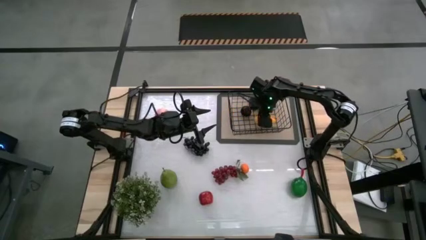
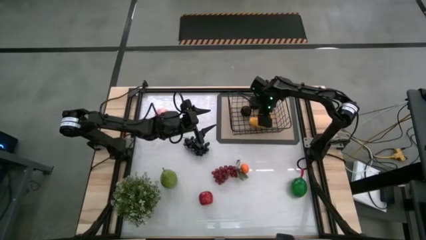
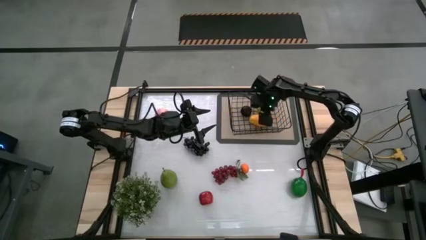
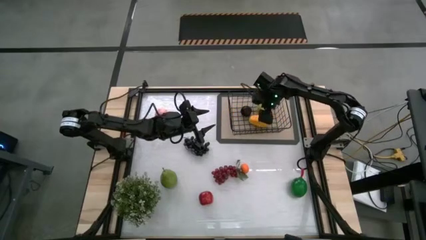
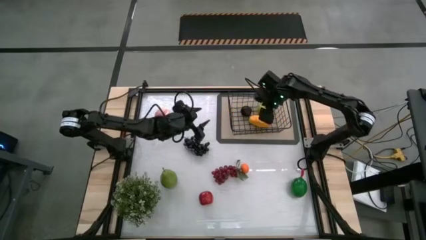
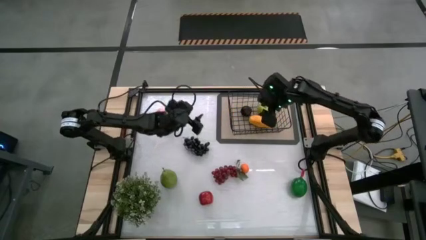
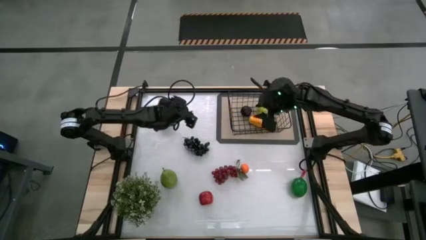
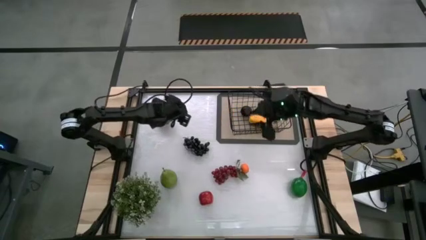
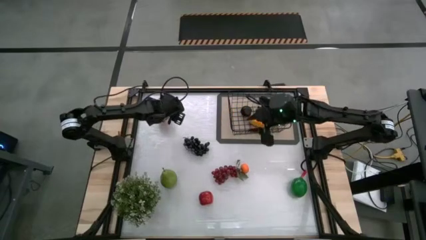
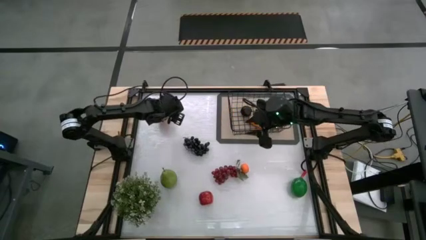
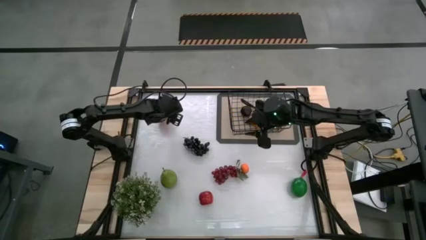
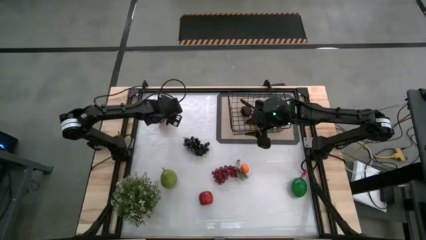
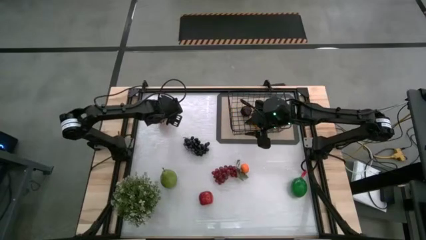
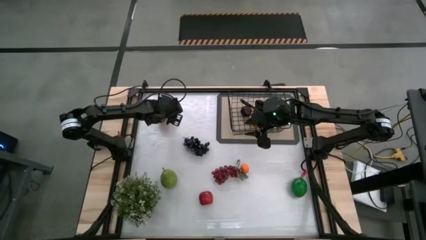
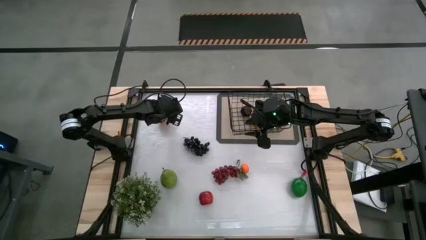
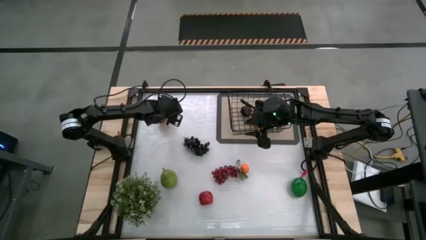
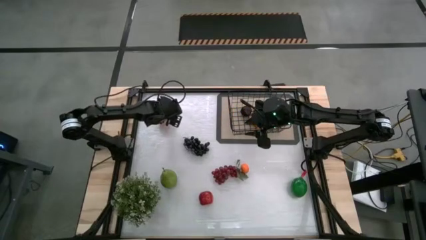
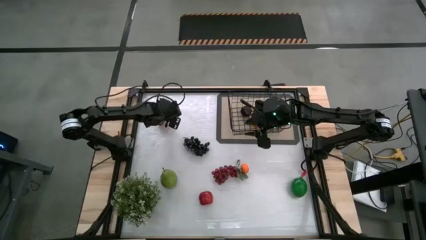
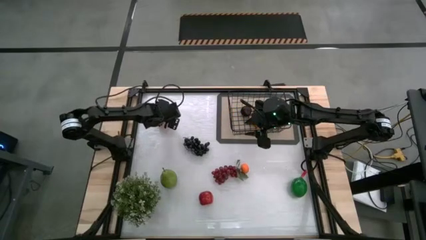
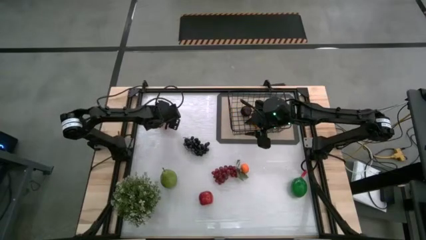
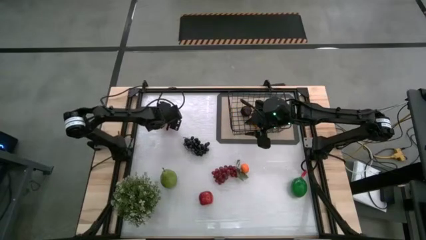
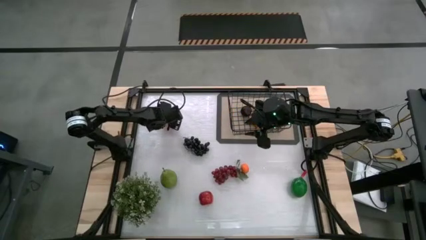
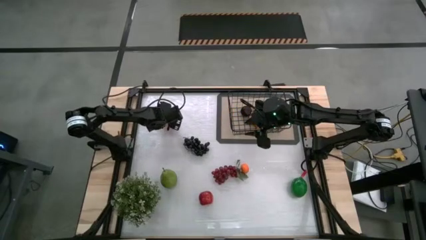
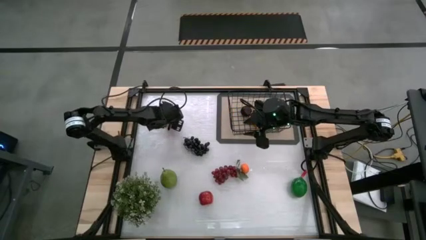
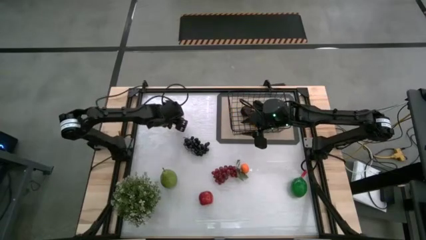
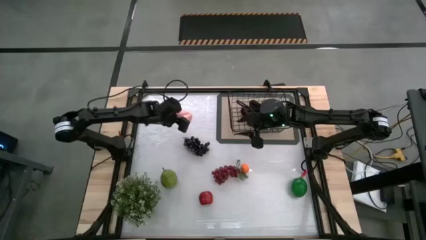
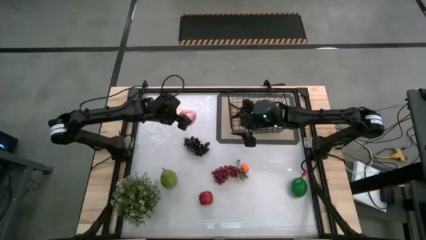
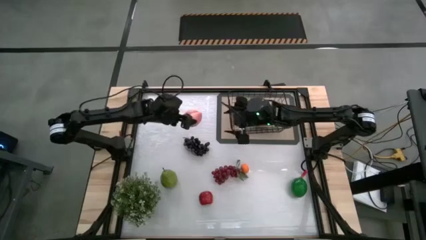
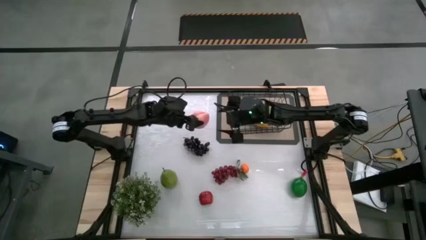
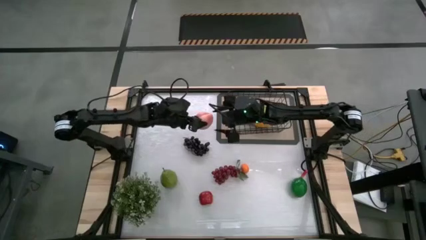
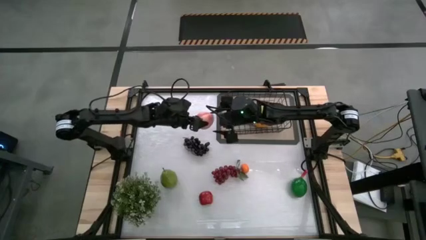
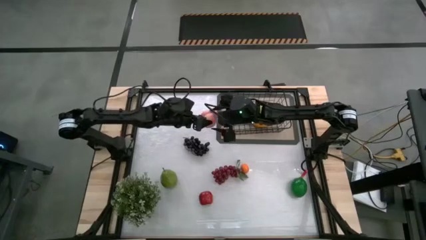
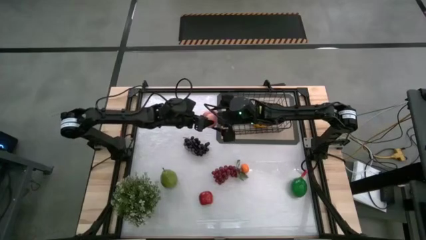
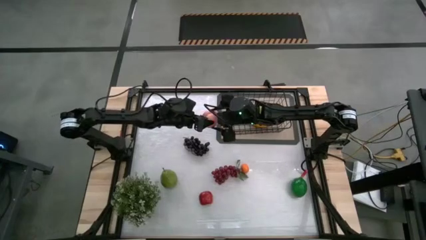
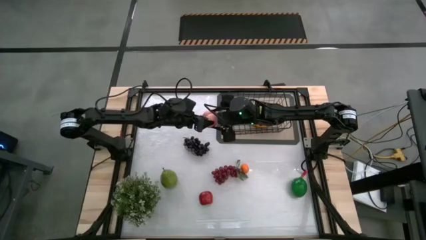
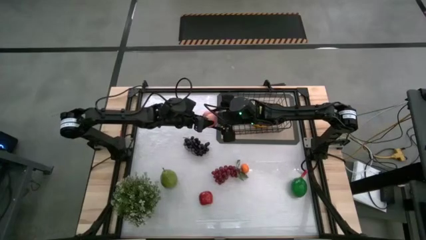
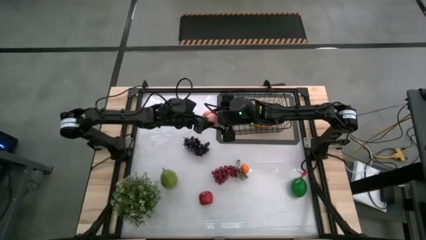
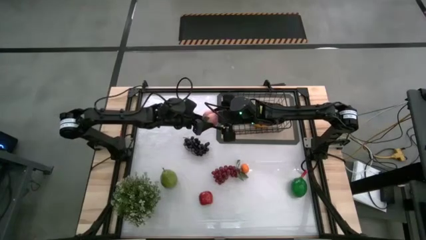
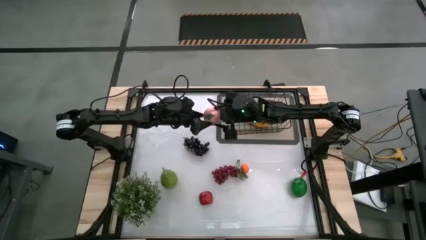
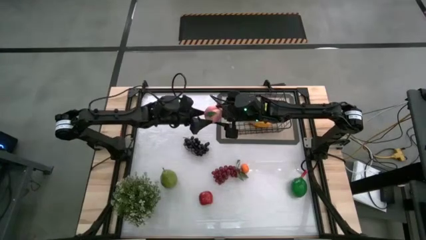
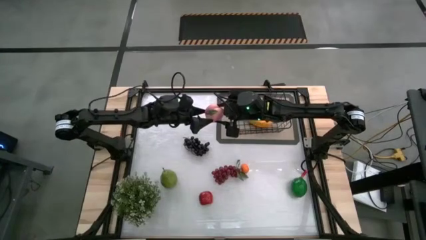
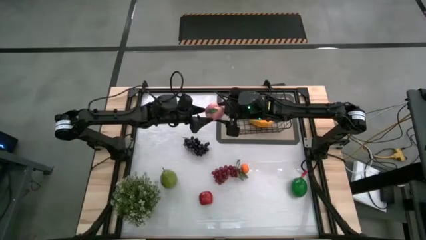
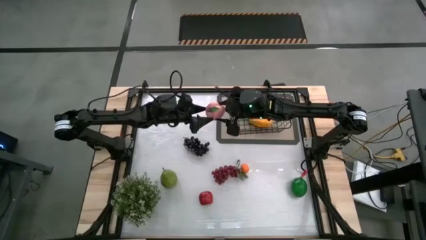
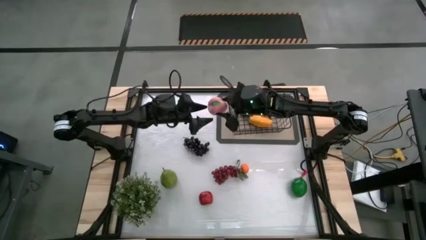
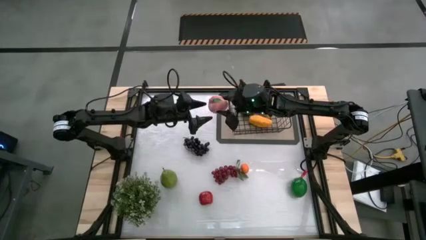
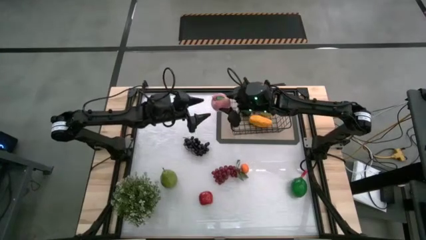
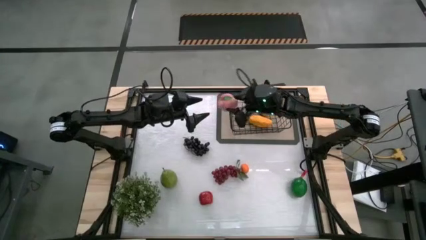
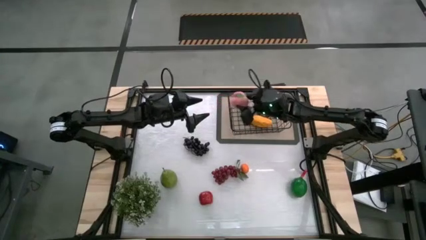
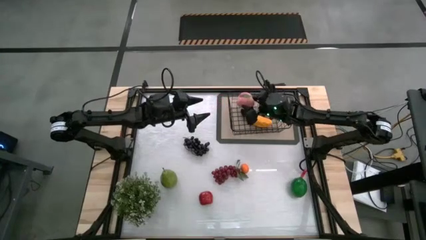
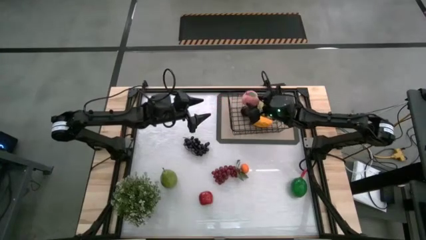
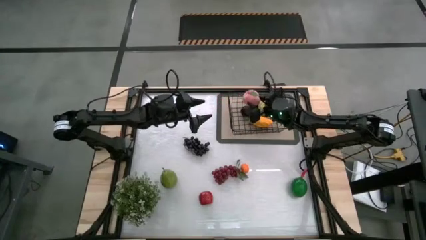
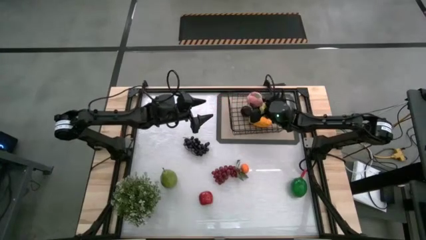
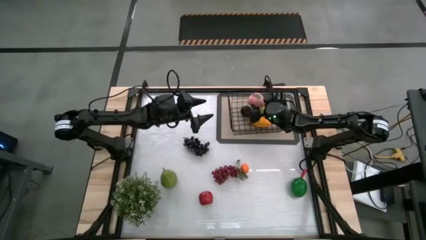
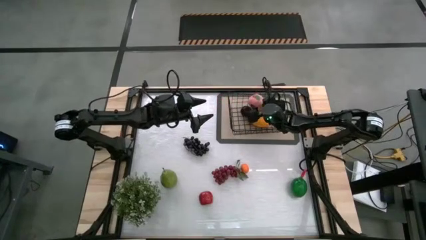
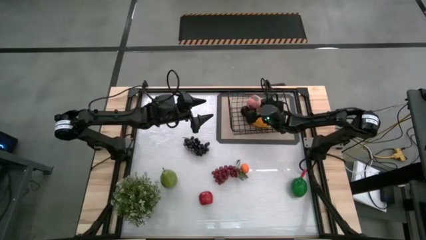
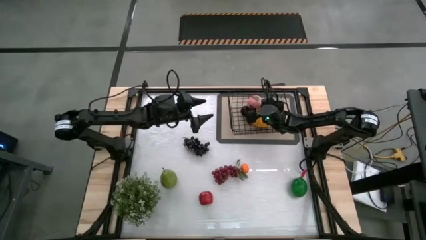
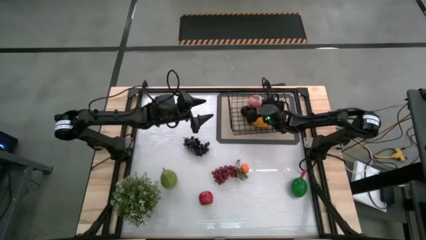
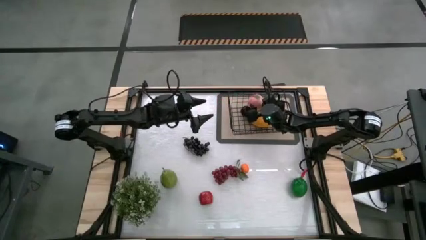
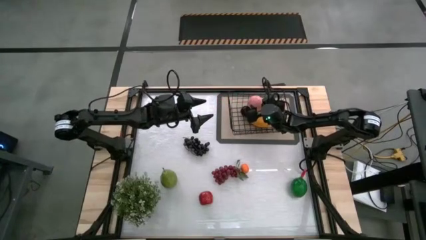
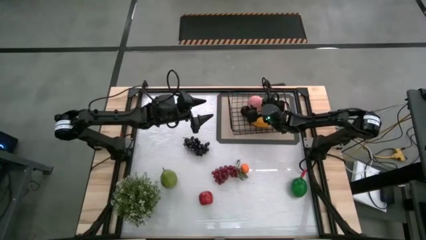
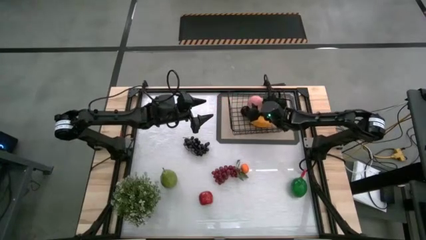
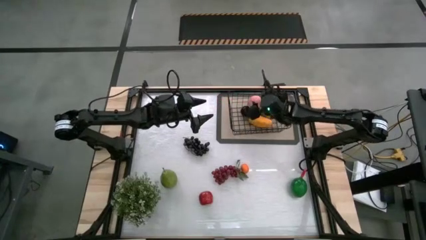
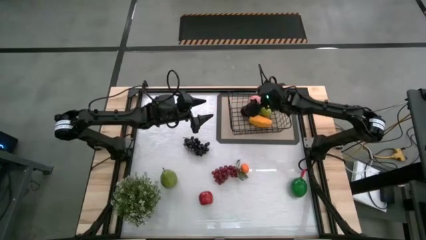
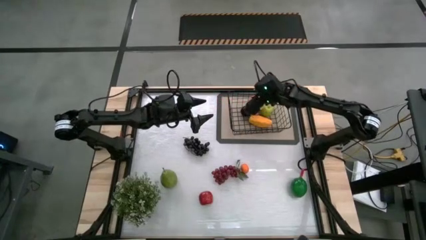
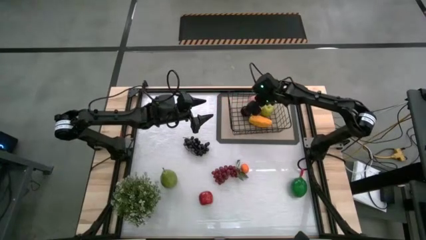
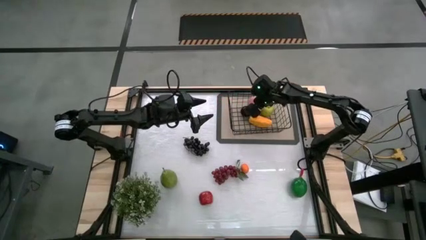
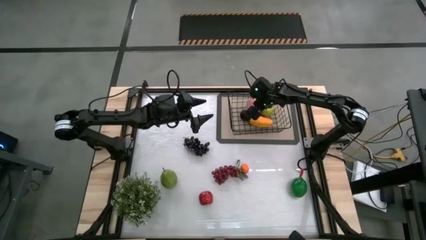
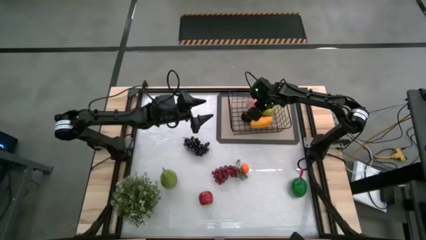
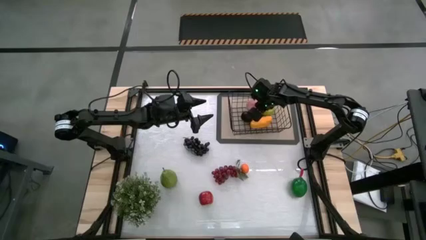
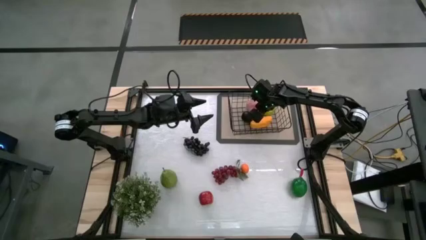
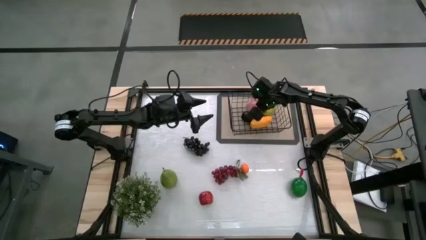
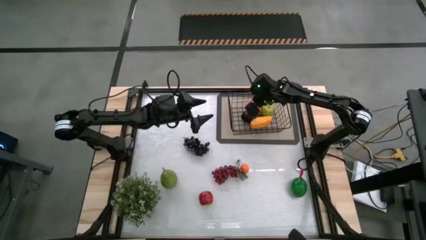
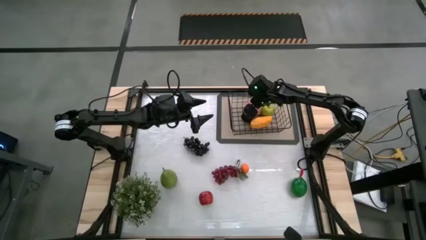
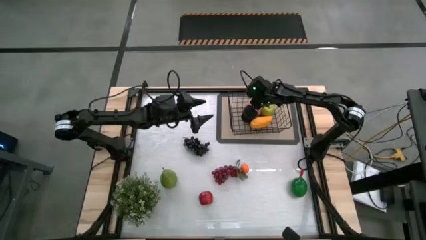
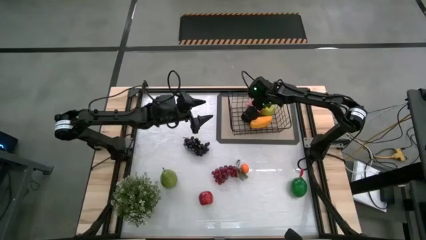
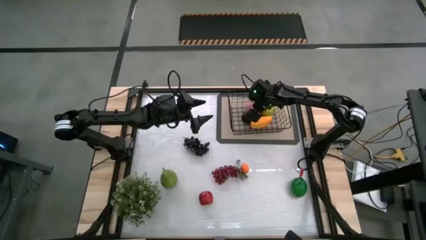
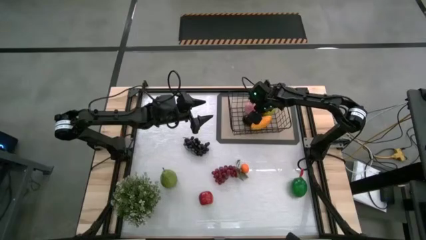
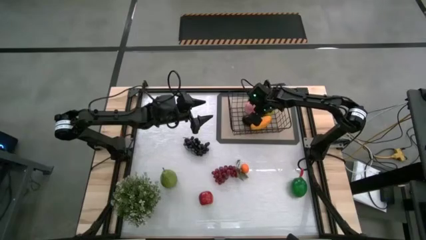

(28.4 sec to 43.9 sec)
Task: Build produce basket
Put the peach into the black basket
